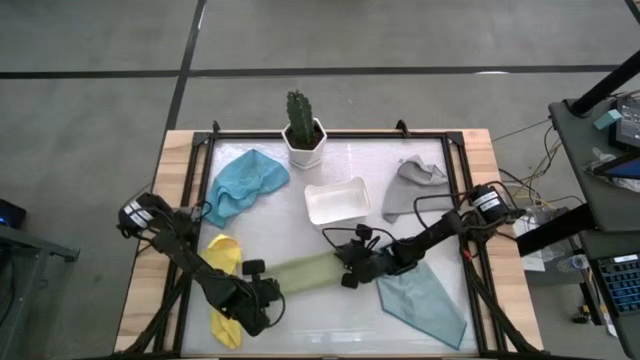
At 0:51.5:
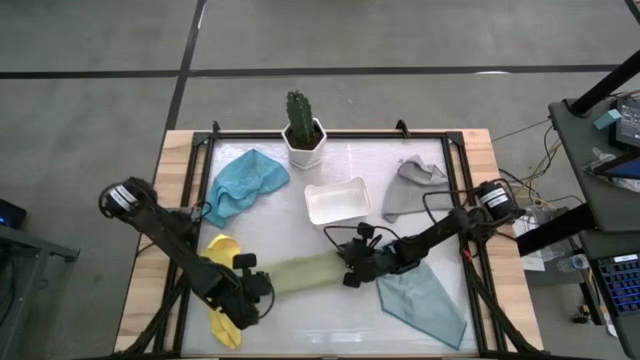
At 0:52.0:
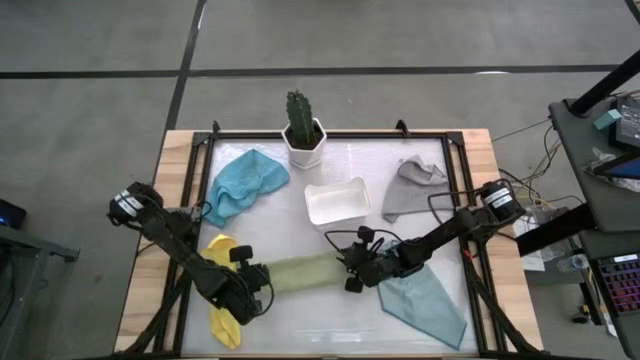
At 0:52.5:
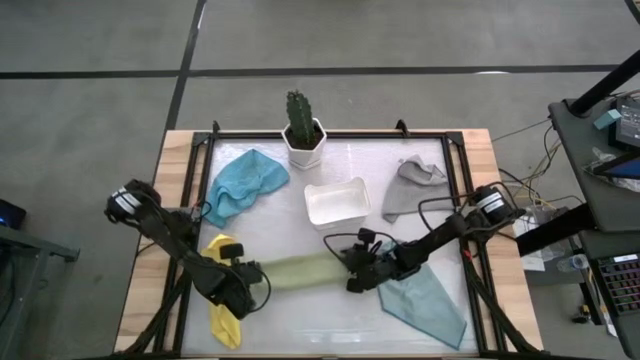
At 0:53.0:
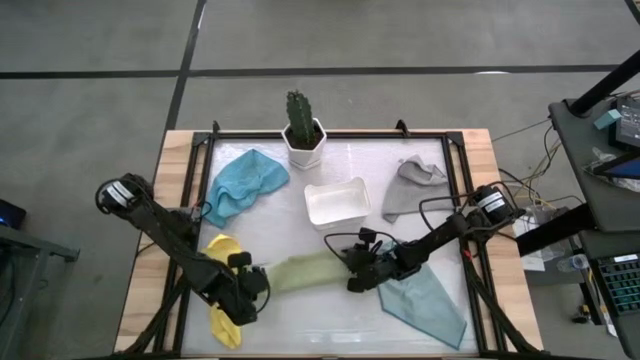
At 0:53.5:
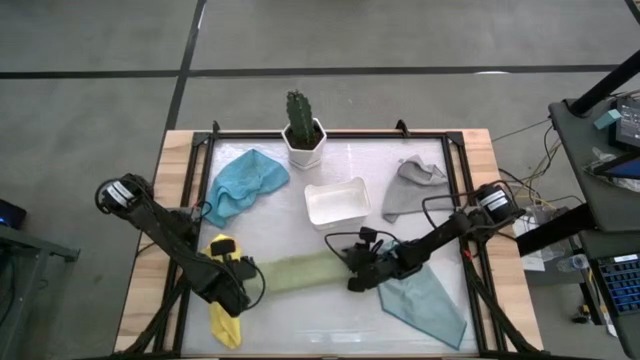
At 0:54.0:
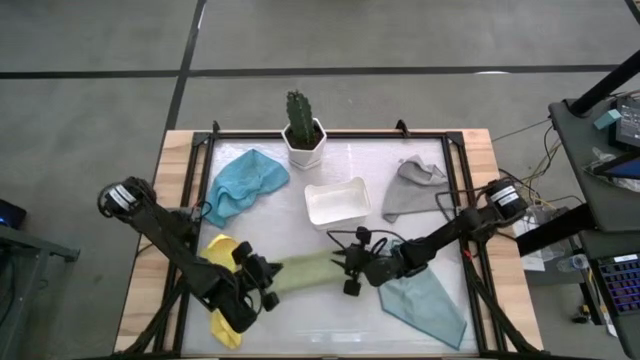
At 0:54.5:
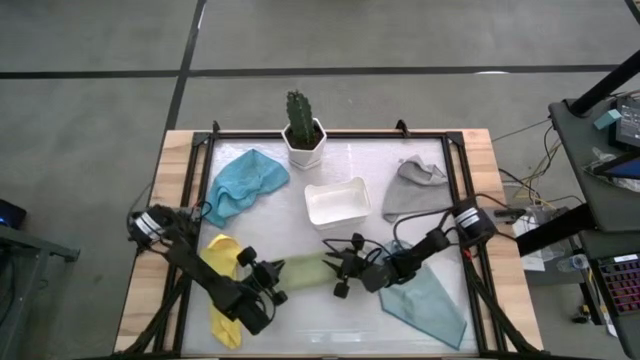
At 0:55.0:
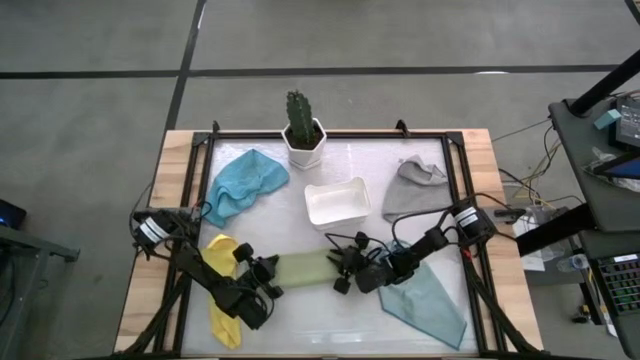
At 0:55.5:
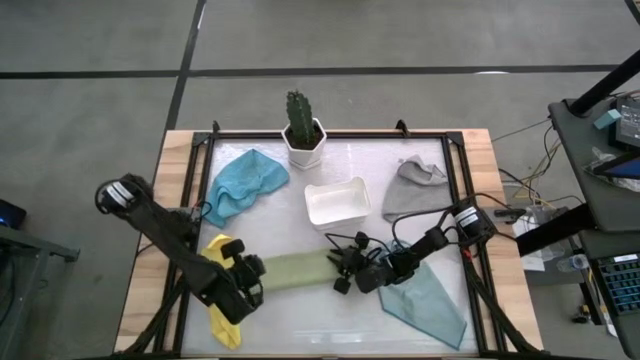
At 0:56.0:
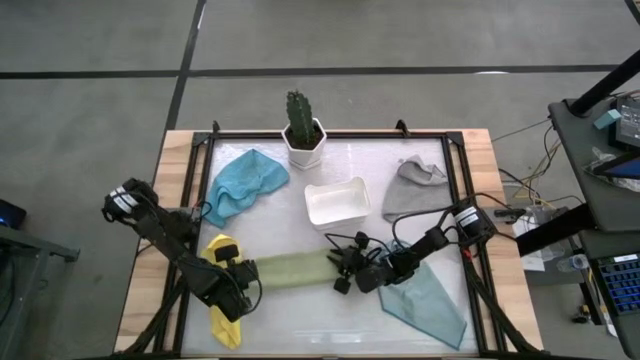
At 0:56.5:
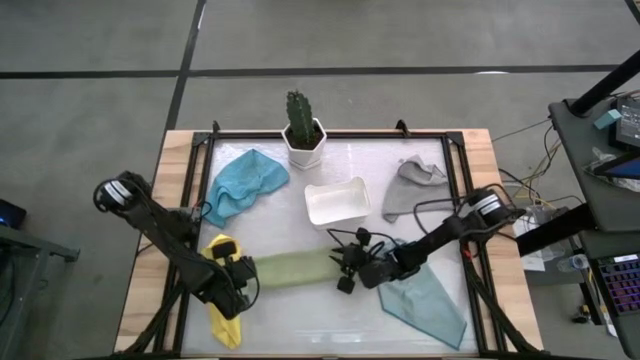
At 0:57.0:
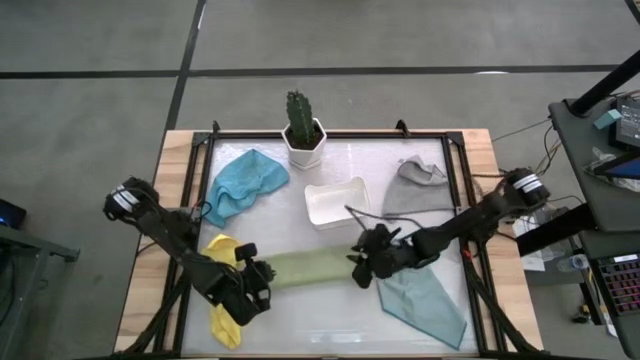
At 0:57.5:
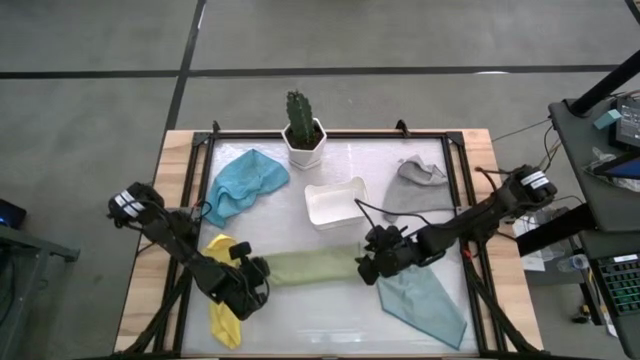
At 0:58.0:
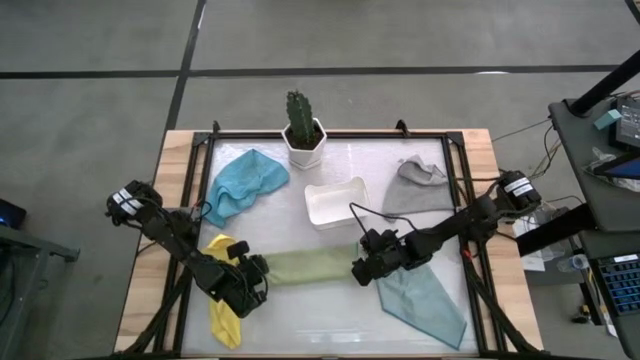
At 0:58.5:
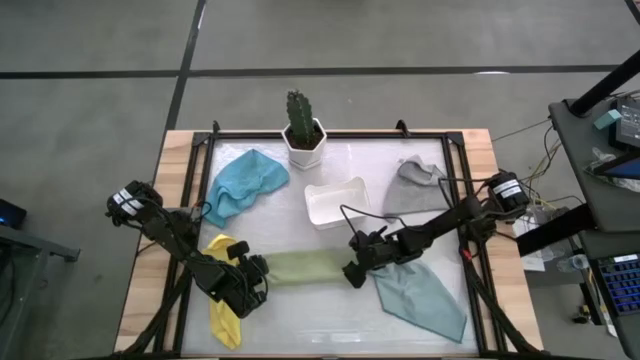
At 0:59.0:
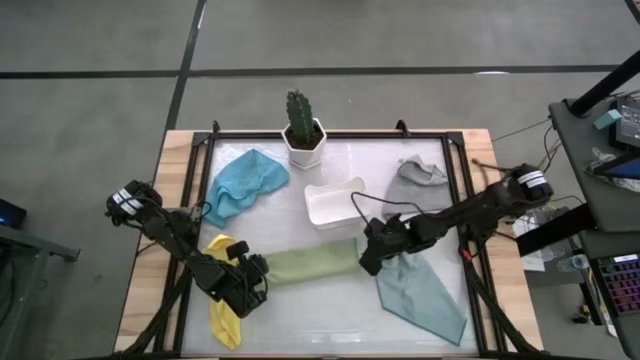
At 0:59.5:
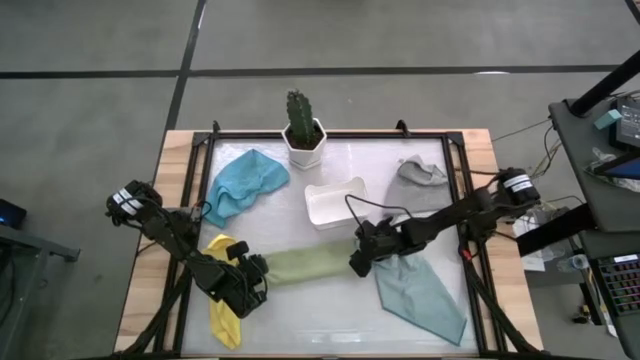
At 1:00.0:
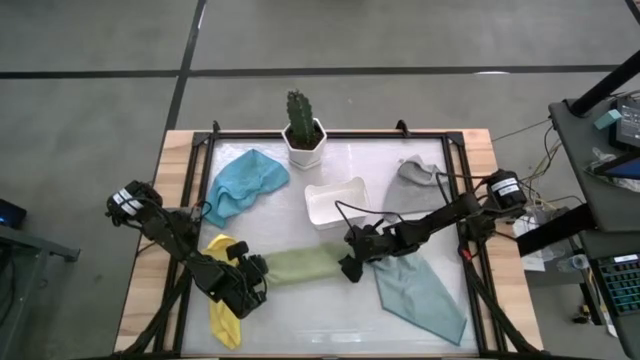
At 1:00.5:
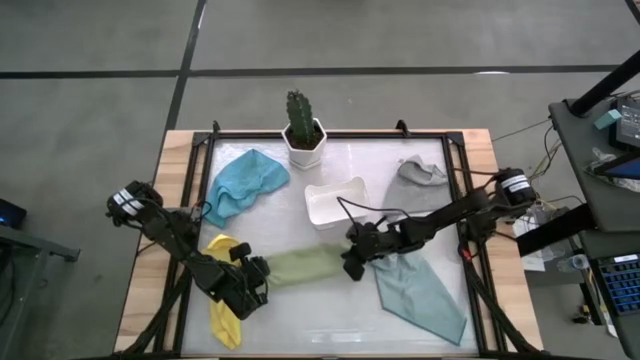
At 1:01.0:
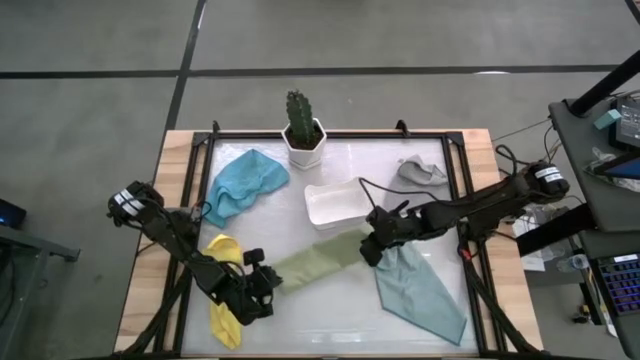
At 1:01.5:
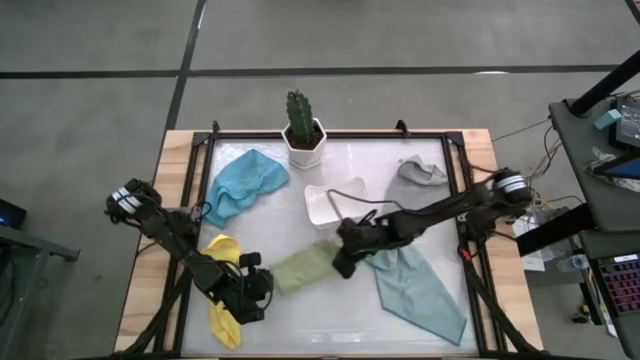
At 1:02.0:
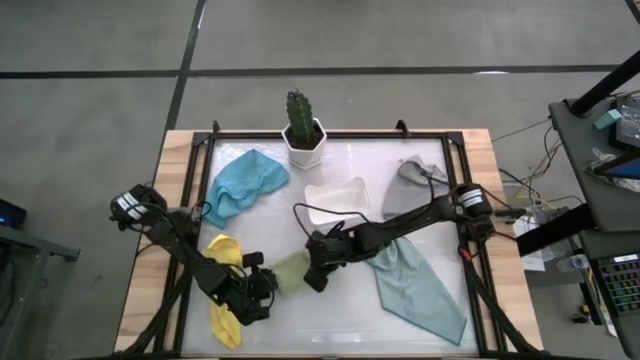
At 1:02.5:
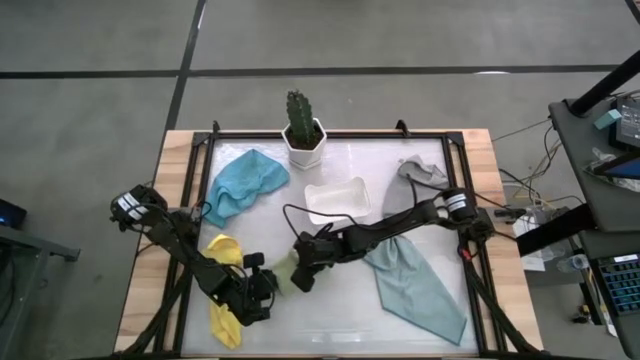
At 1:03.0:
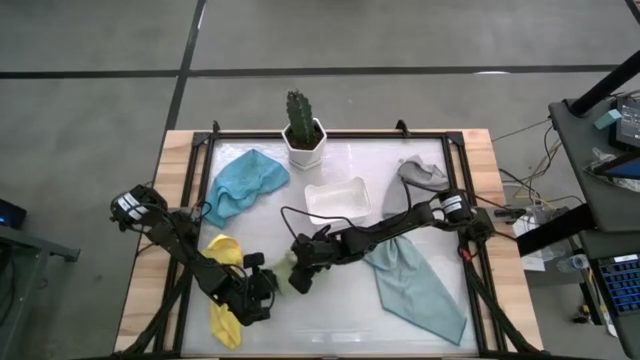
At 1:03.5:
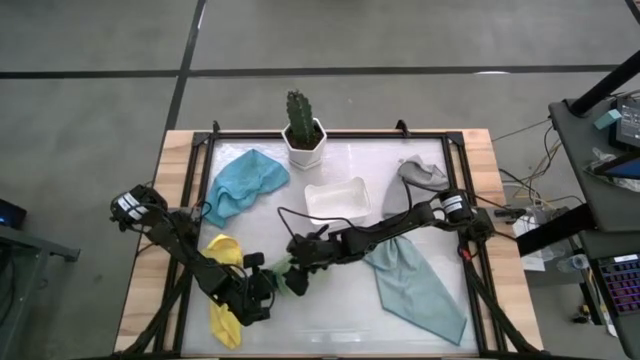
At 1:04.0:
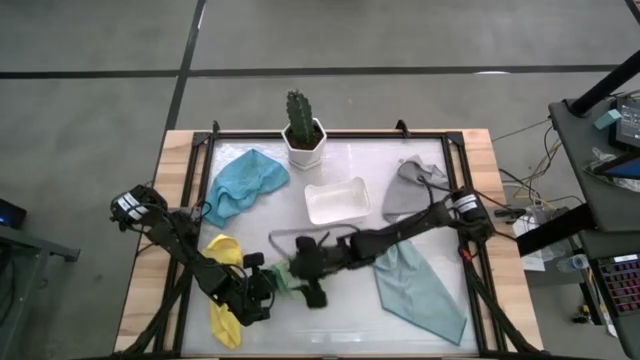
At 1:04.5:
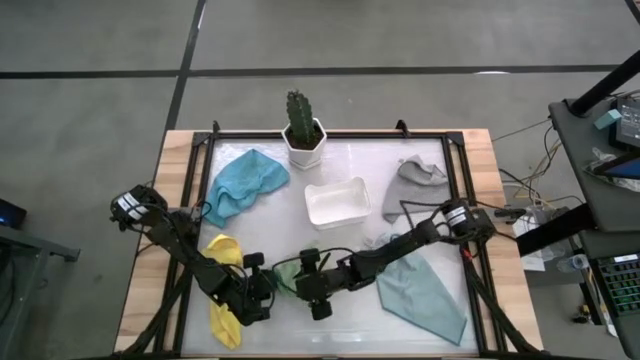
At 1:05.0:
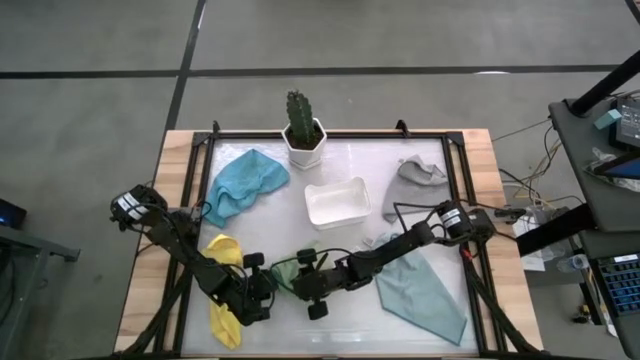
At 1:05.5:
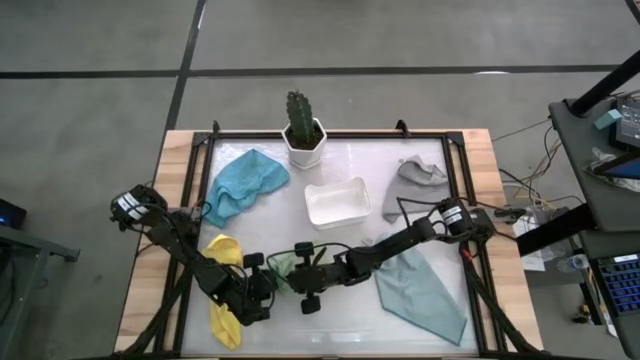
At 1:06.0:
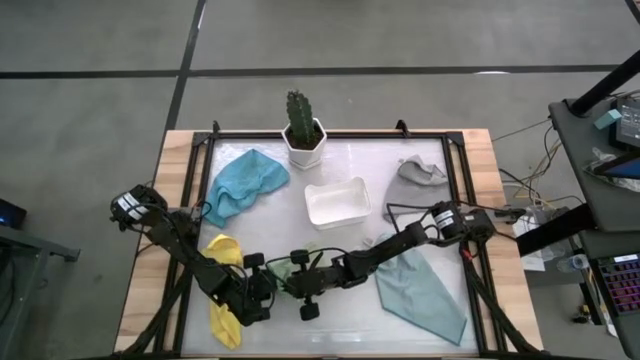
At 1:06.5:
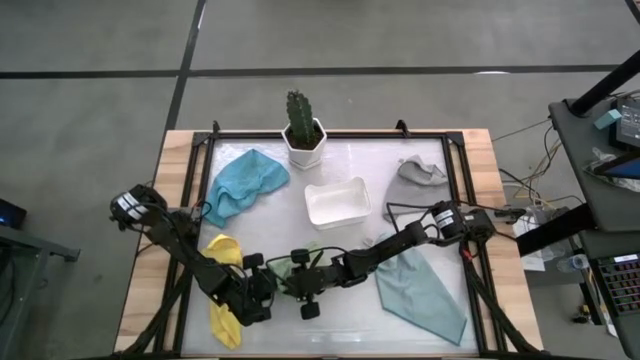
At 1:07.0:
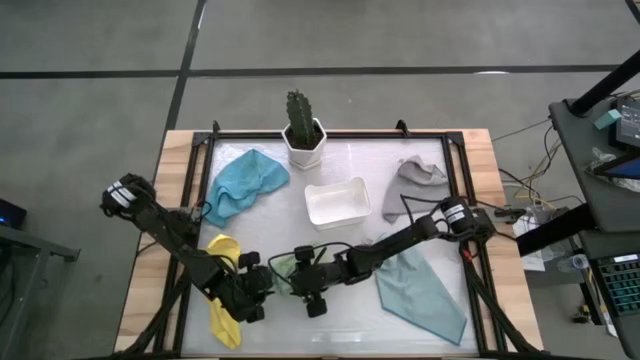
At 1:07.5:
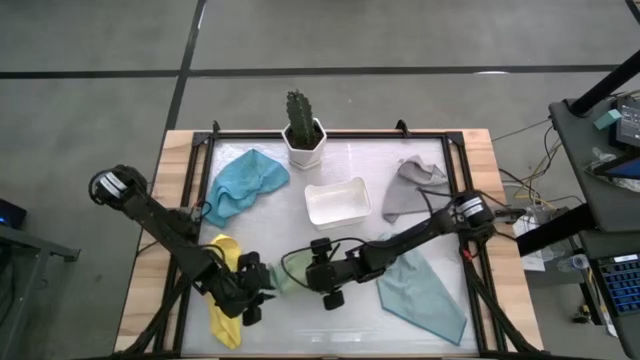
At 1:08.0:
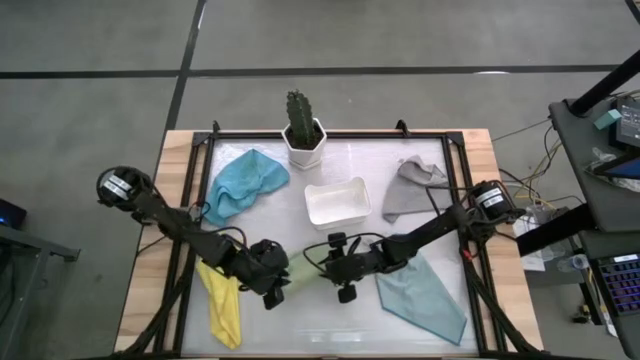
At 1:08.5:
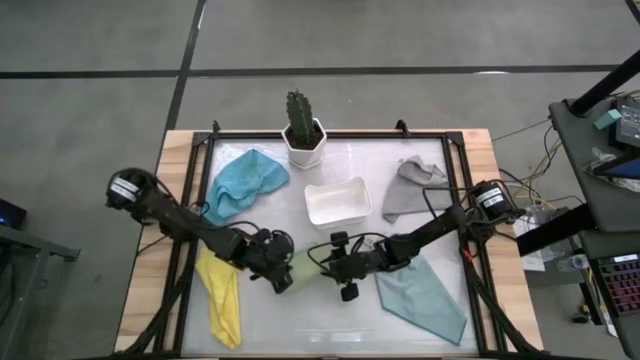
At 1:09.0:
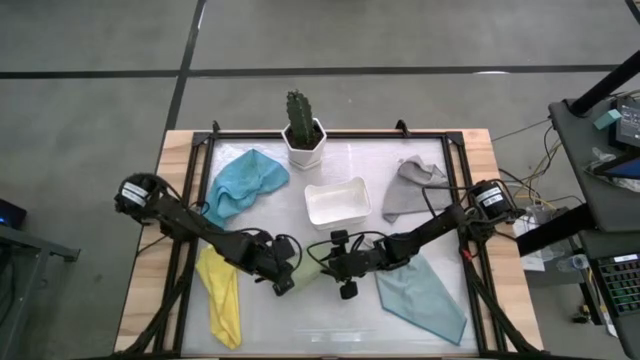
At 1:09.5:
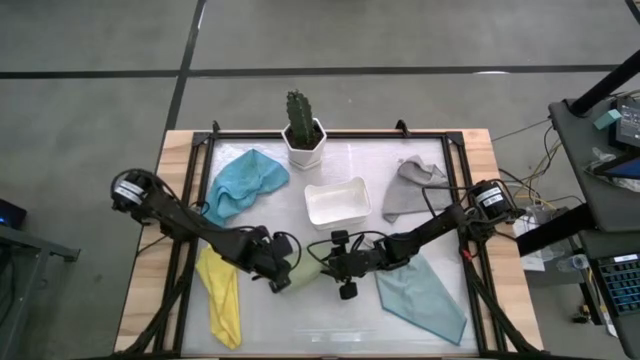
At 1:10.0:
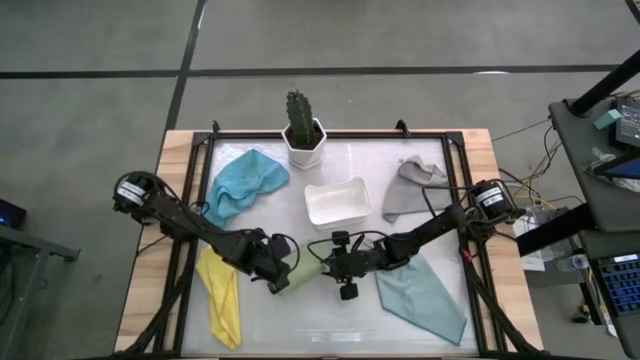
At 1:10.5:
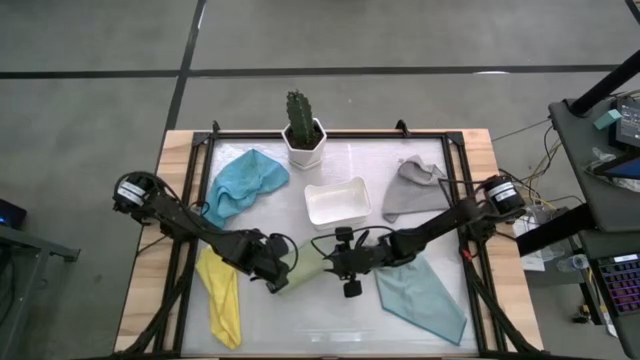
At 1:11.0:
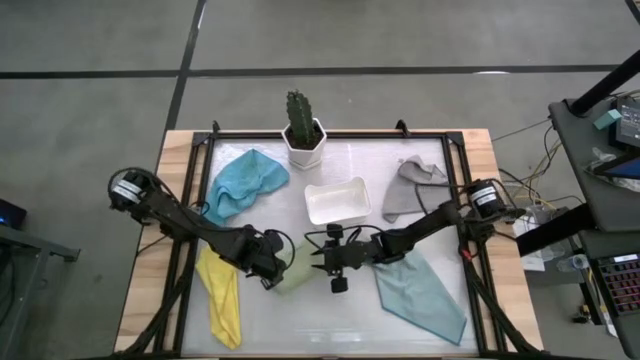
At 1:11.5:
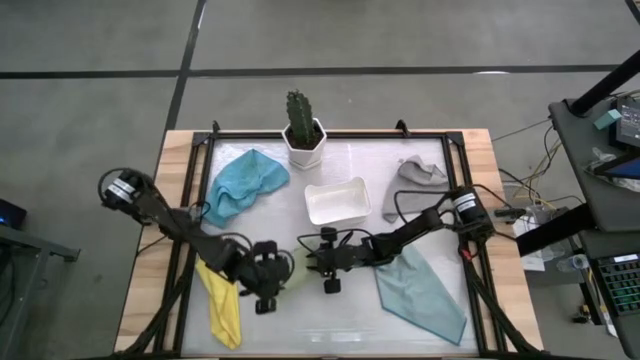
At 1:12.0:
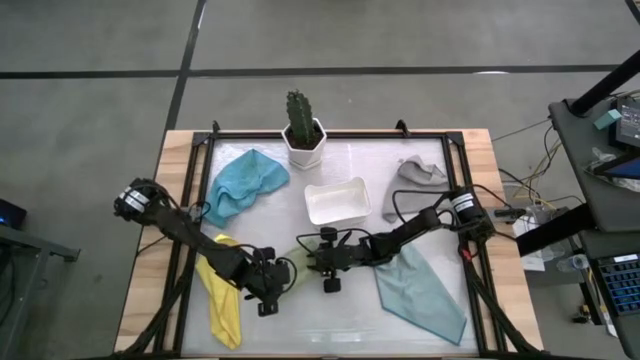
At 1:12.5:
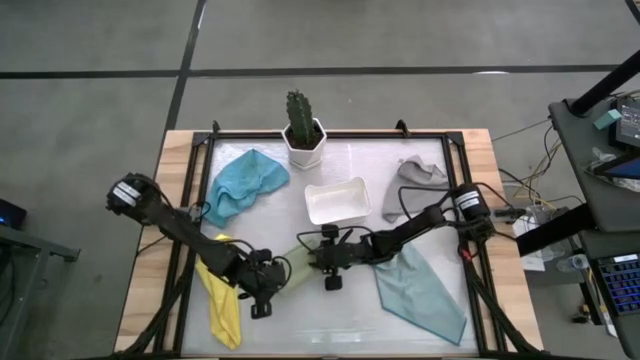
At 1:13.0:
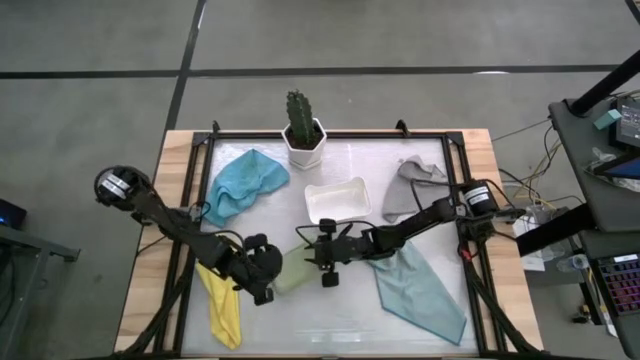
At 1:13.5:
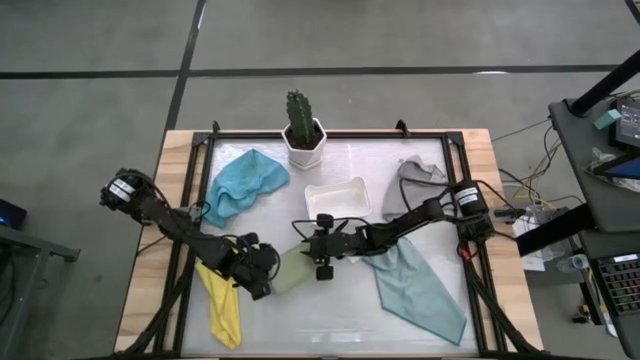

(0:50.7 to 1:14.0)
Task: Fold microfiber towels
Fold the green towel
